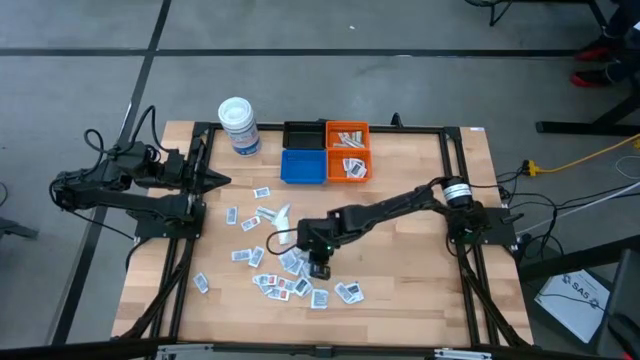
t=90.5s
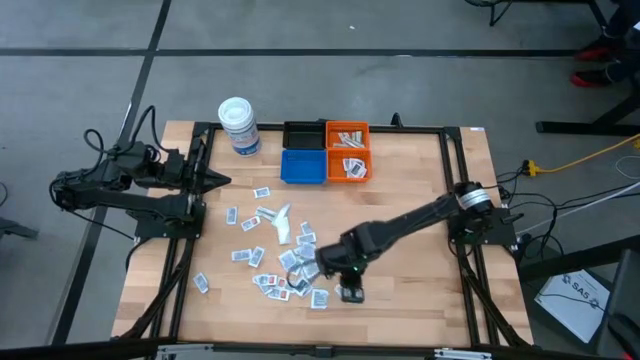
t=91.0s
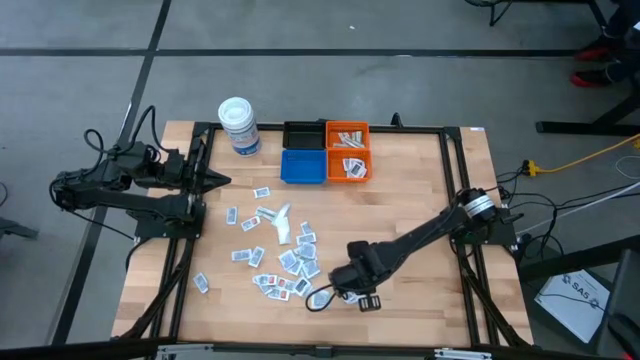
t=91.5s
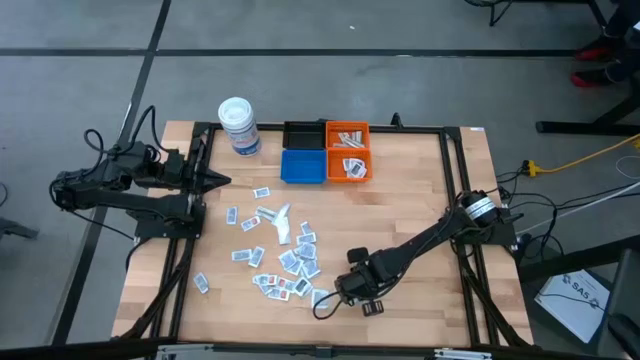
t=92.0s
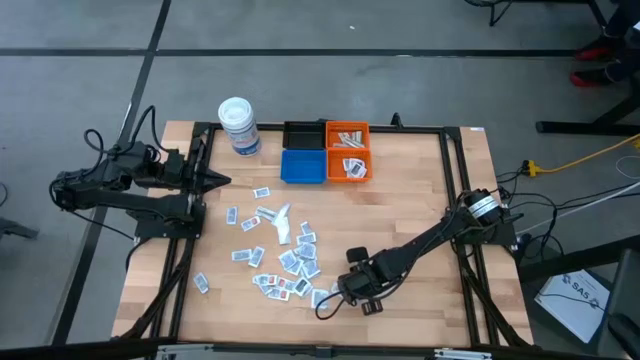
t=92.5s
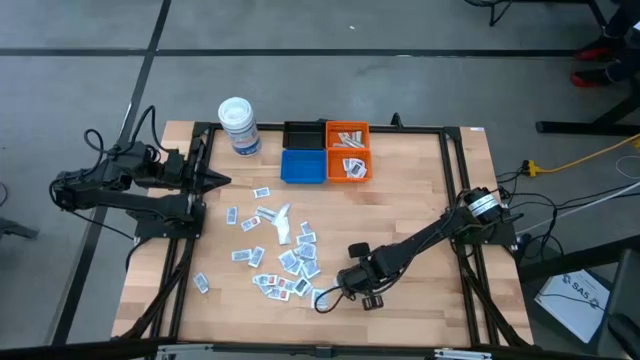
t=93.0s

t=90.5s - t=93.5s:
Task: Pick & Place First Aid Supplies
Put the towelette pack into the bottom orange bin

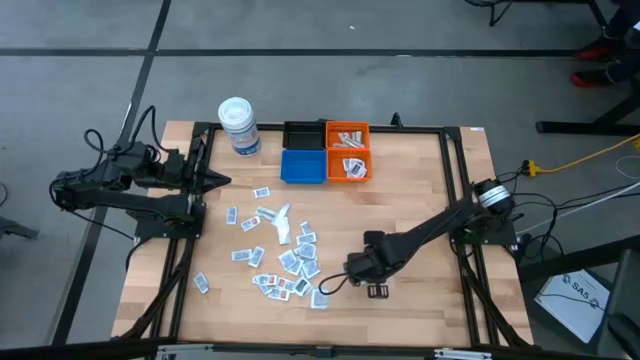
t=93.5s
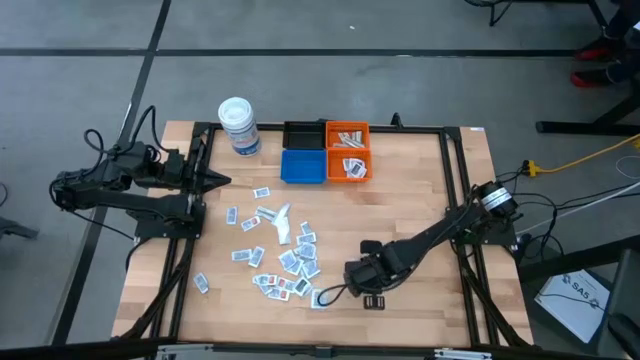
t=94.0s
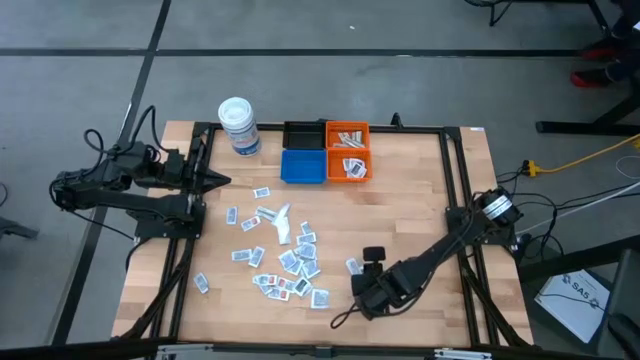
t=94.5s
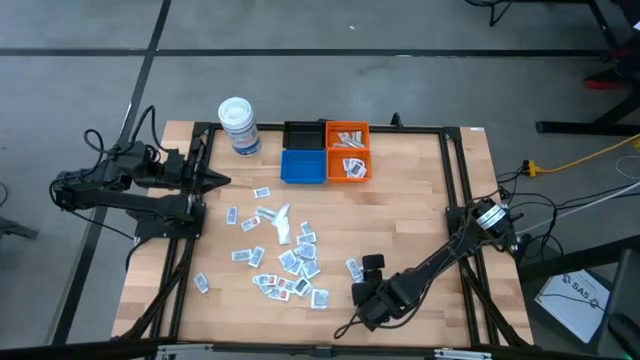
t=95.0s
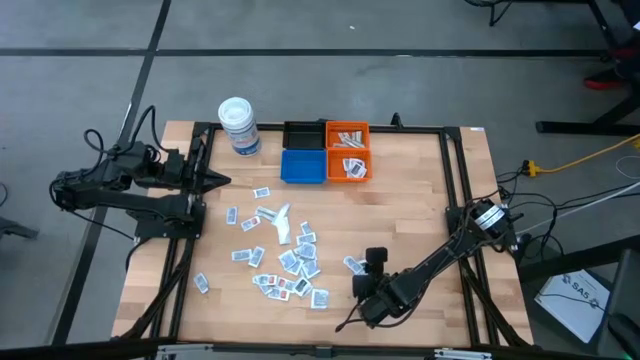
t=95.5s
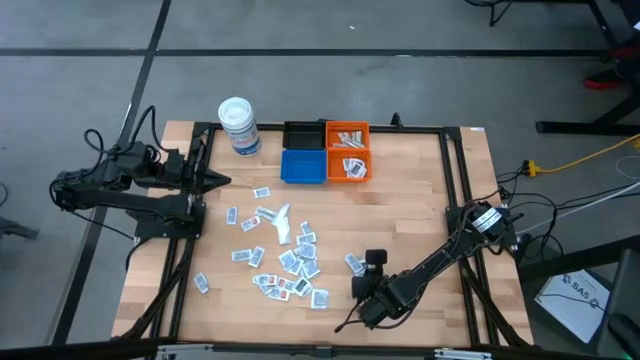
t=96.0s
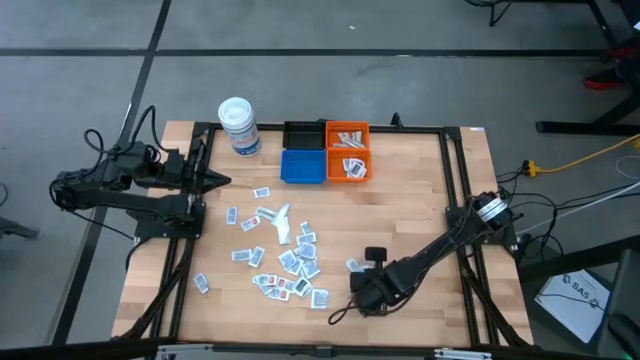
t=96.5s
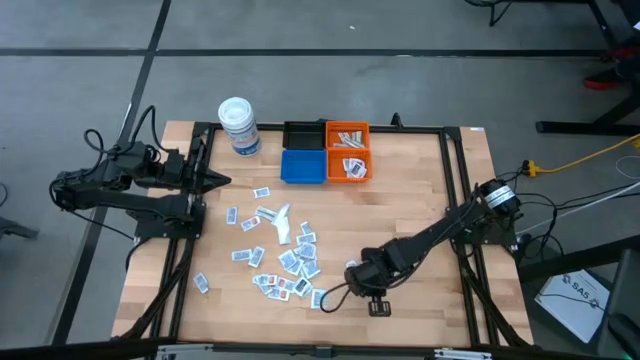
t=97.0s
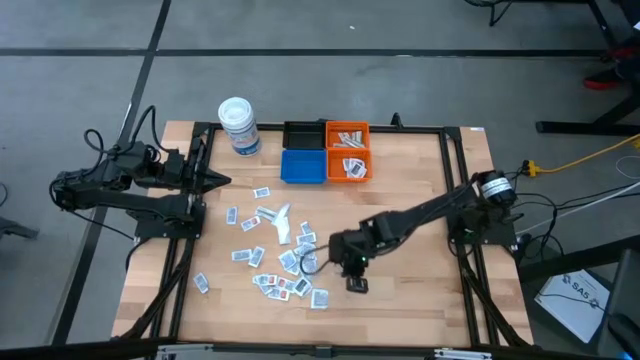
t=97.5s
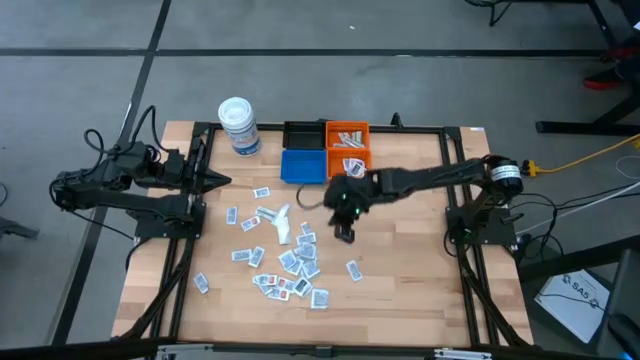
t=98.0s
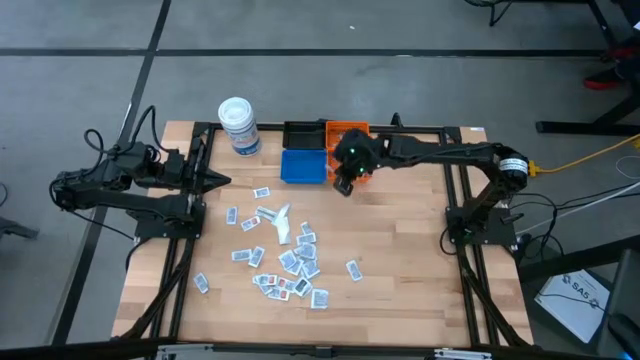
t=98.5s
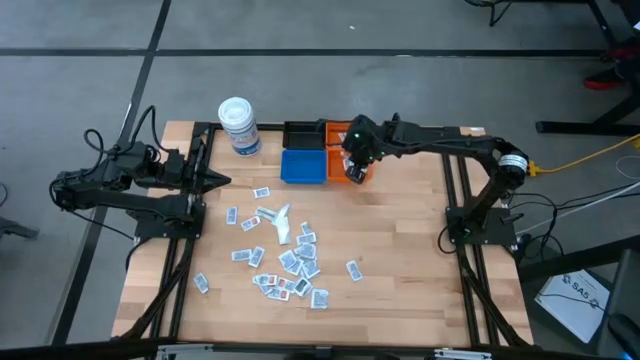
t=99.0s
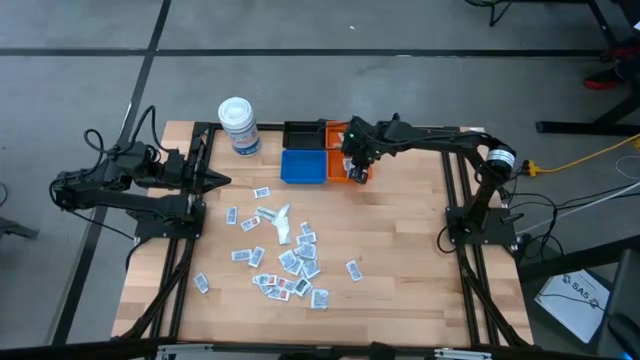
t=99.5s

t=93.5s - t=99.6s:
Put the towelette pack into the bottom orange bin

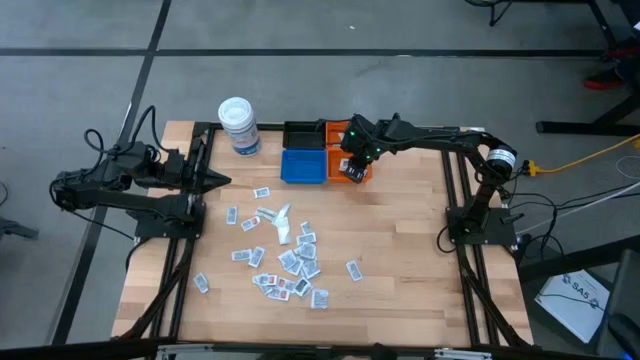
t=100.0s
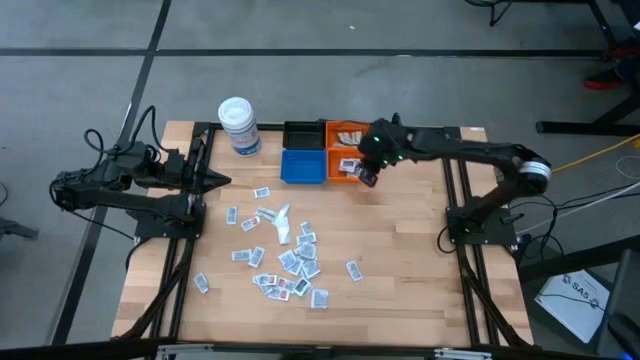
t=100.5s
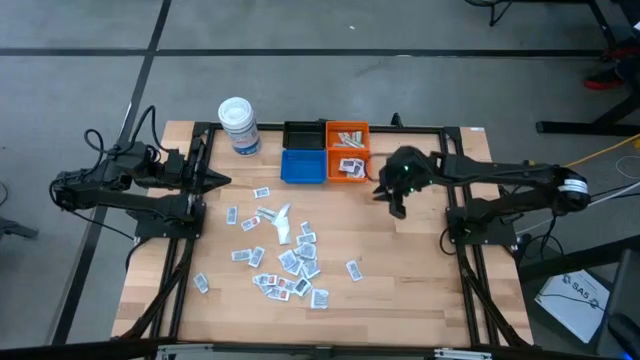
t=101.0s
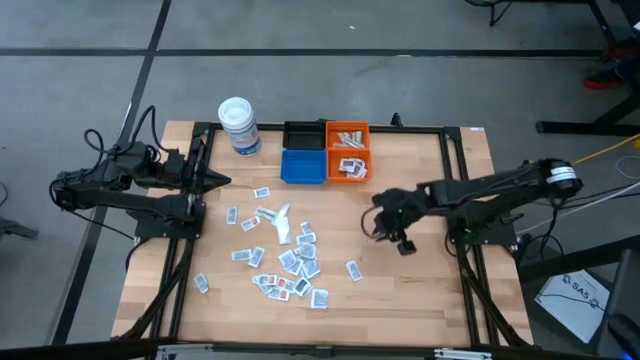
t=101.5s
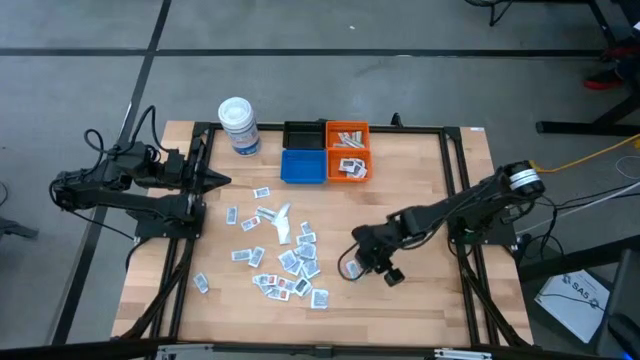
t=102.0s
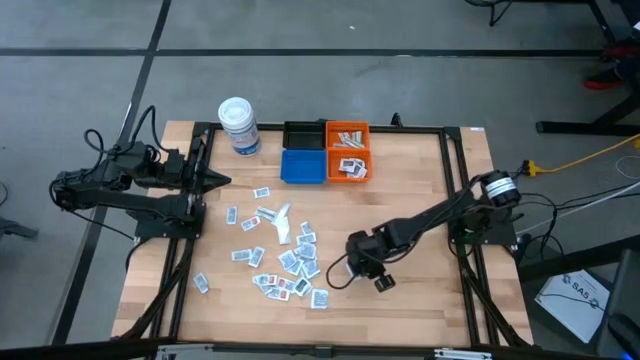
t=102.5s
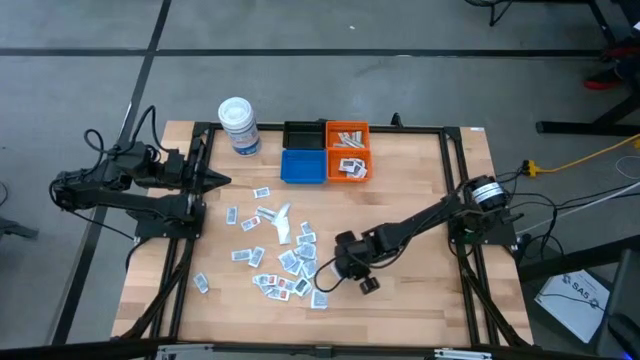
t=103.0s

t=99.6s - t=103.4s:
Move the ointment pack near the wound care packs

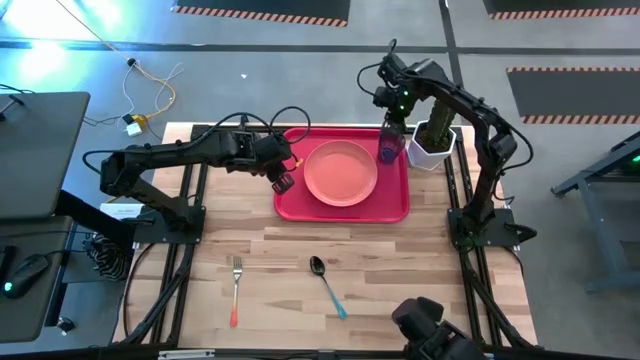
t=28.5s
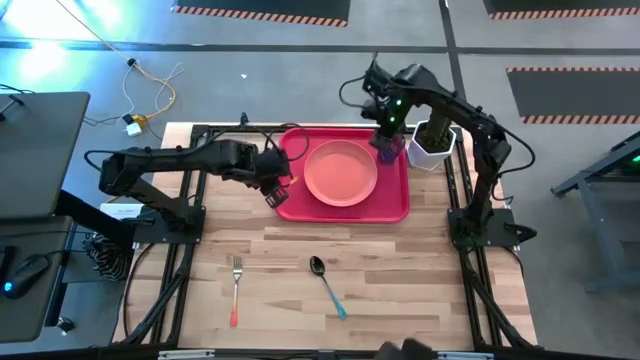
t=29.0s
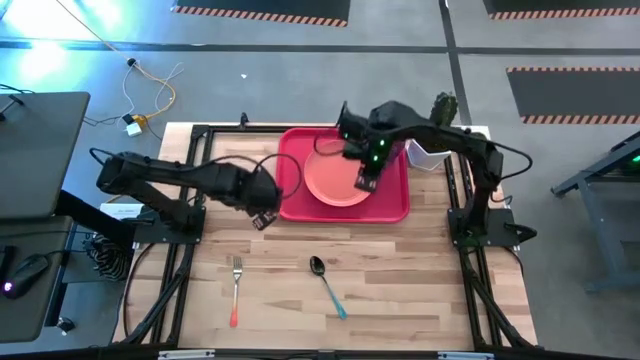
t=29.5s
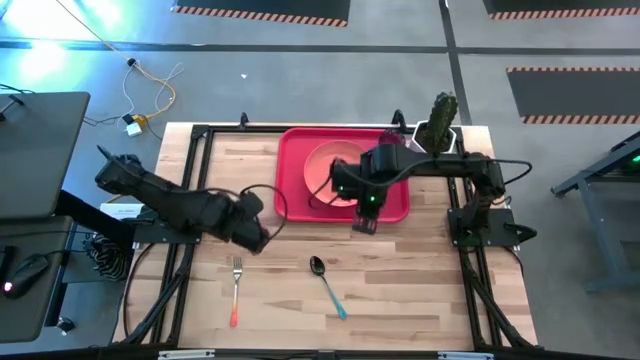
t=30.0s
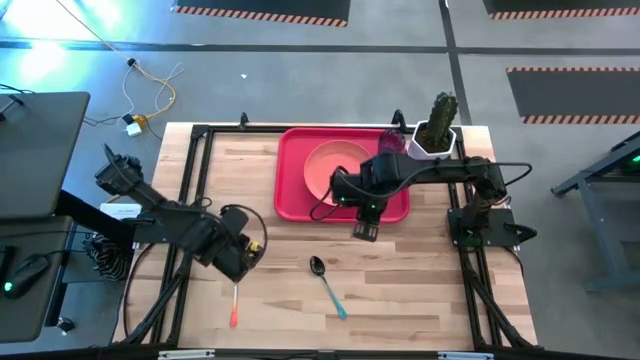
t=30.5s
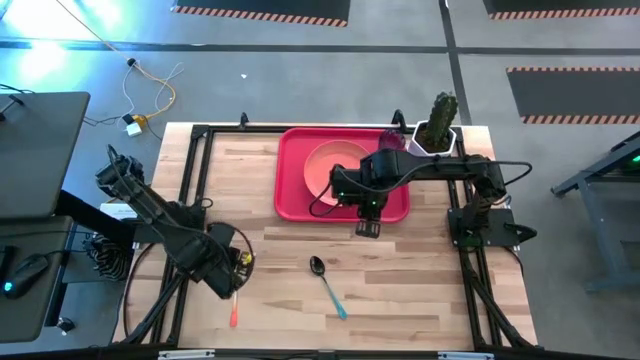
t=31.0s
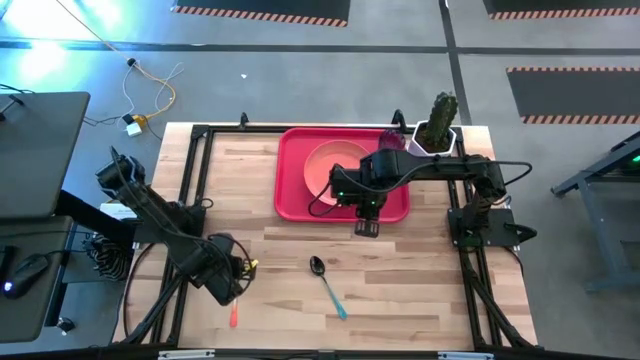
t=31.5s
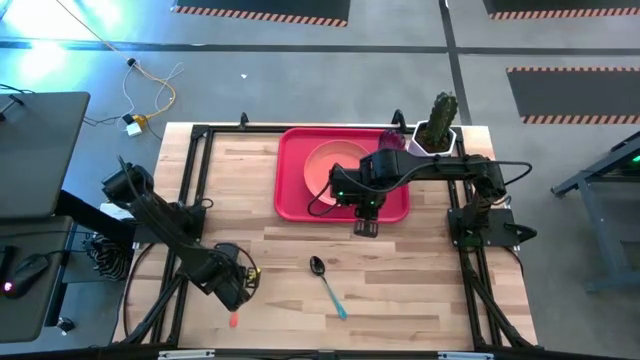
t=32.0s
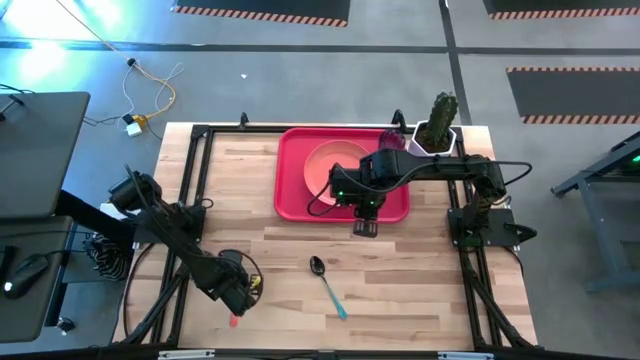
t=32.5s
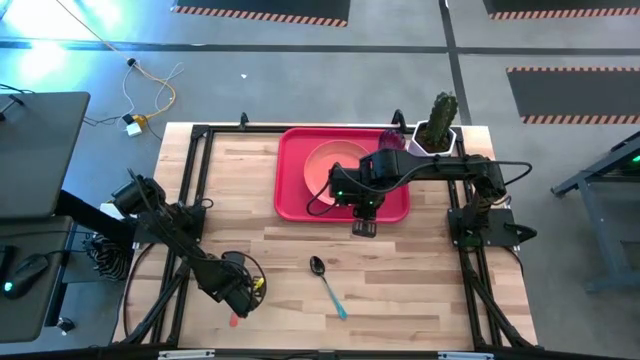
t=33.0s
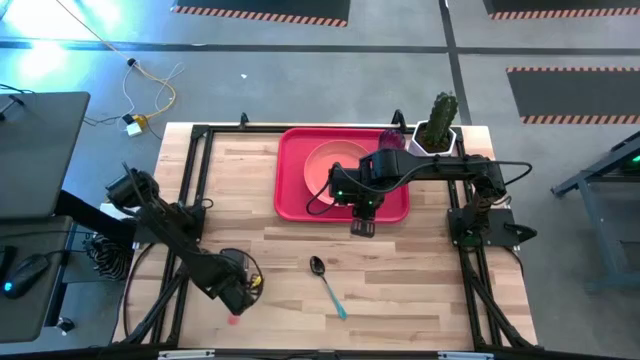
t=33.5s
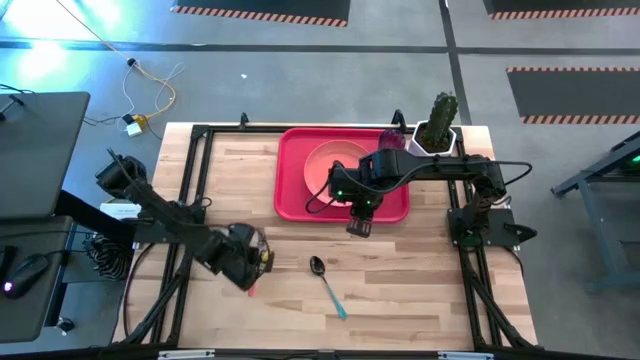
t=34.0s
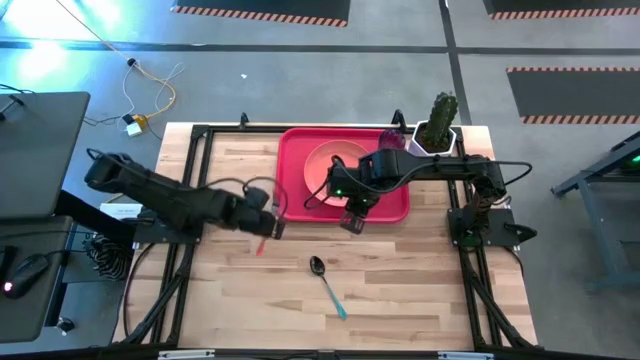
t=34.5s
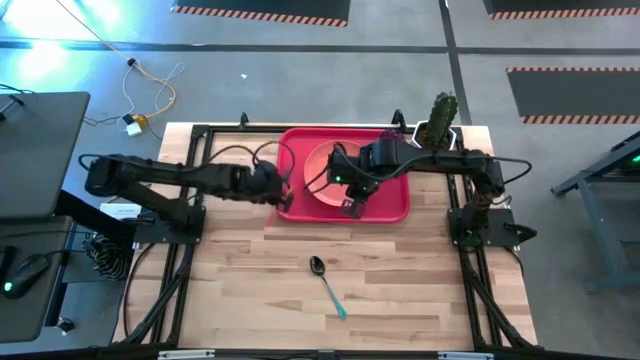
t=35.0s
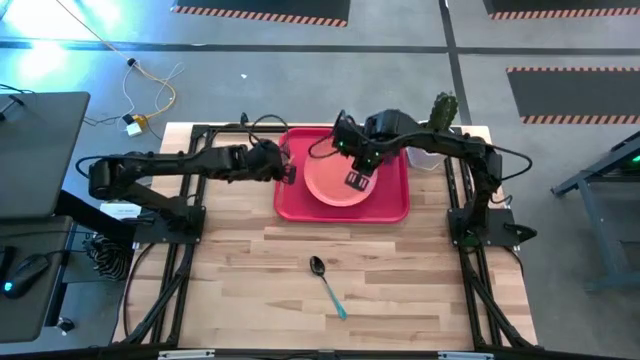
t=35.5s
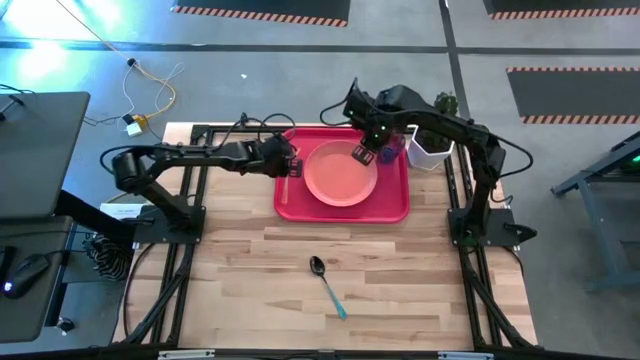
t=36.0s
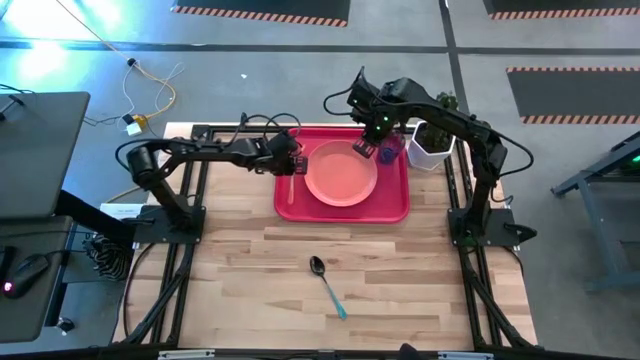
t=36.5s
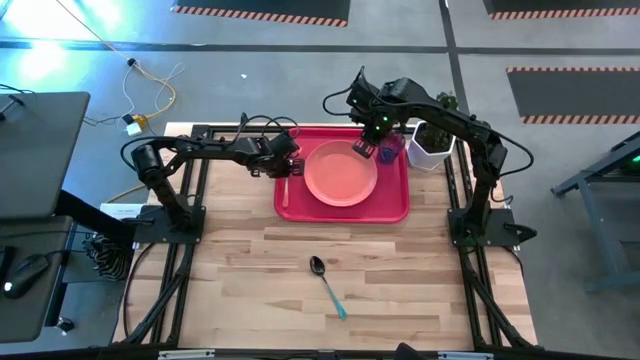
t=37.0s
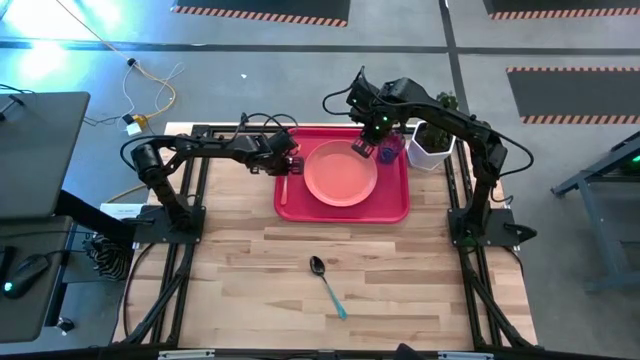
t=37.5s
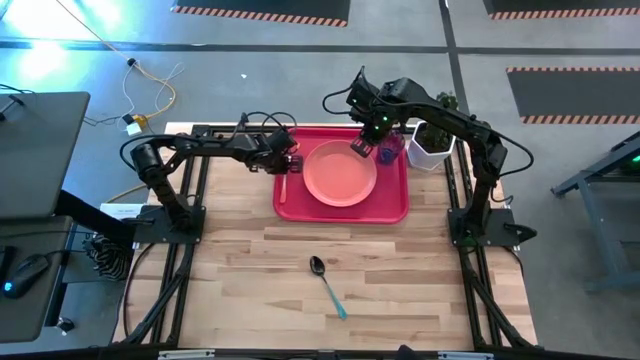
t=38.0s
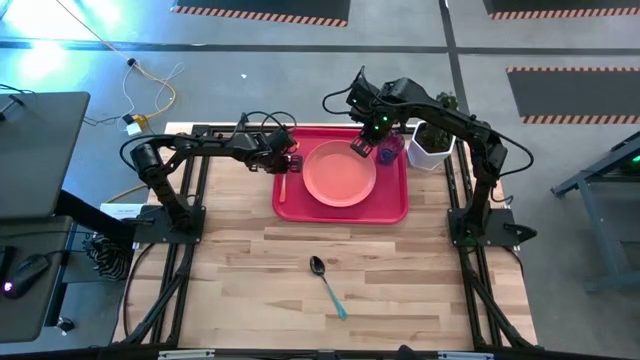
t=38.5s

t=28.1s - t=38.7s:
Task: Pick and place plate/cup/fork/spoon on tray
Put the orange fork on the orange tray on the left side of the orange plate
